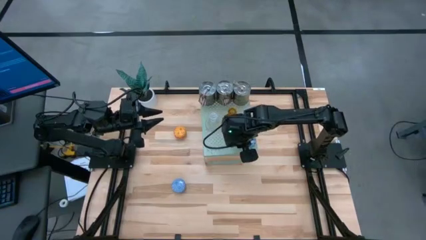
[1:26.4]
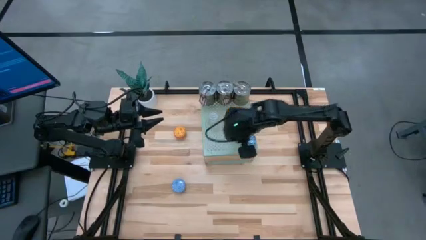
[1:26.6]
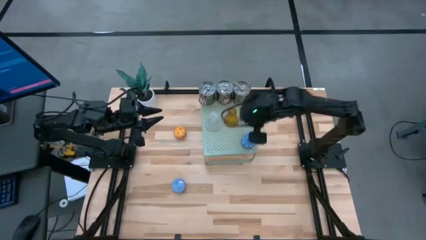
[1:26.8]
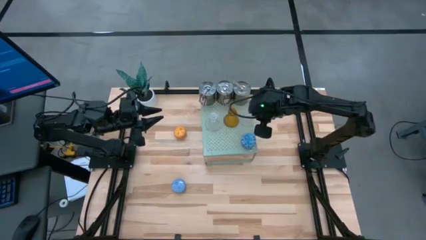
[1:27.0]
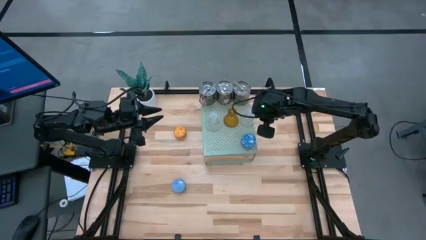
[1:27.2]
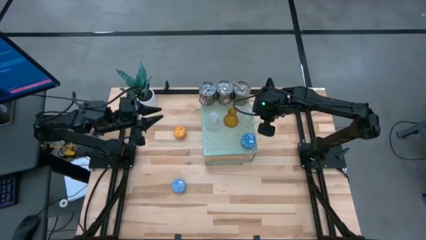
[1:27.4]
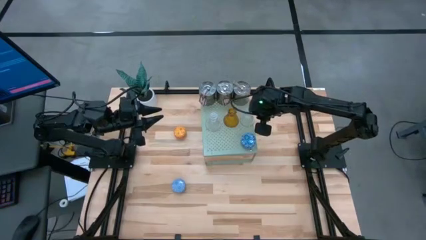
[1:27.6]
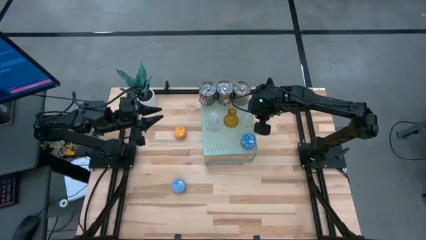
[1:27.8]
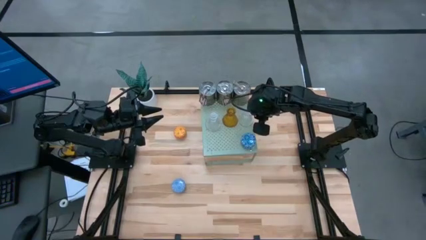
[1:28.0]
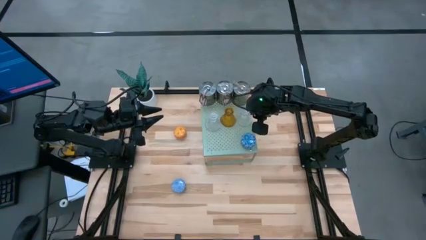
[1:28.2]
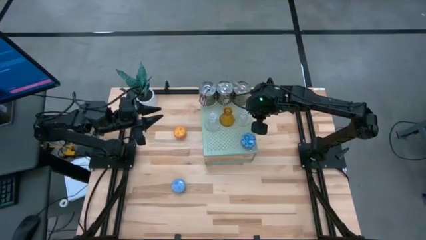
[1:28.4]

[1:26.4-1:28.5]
Task: Pick & Place candle stick holders
Adjust the right transparent candle holder on the shelf

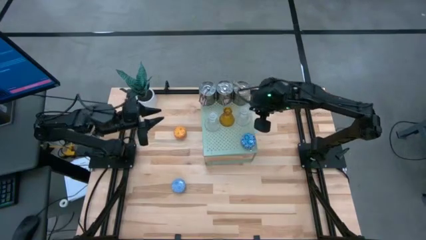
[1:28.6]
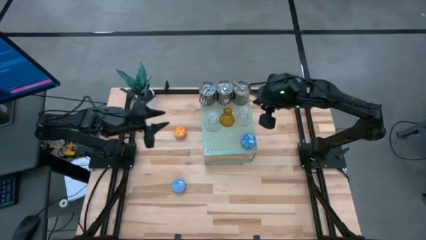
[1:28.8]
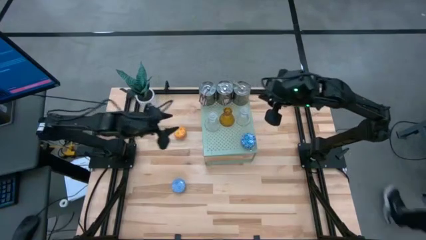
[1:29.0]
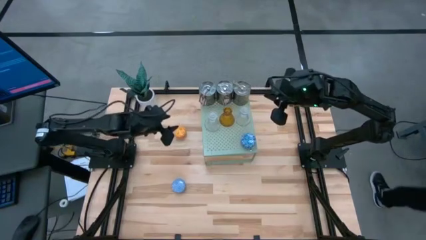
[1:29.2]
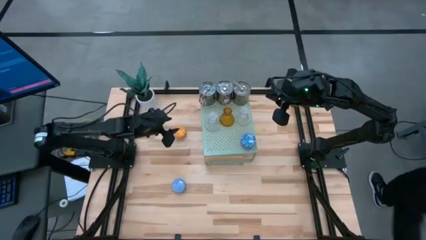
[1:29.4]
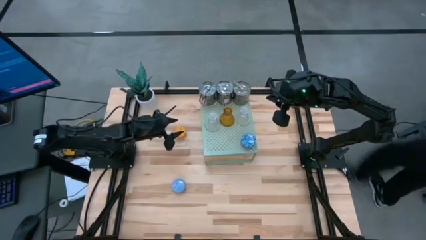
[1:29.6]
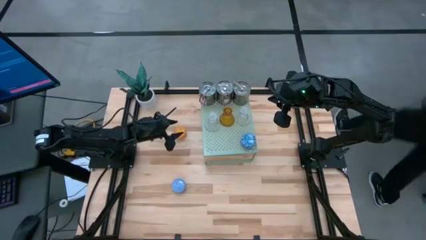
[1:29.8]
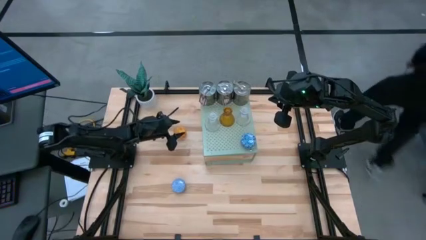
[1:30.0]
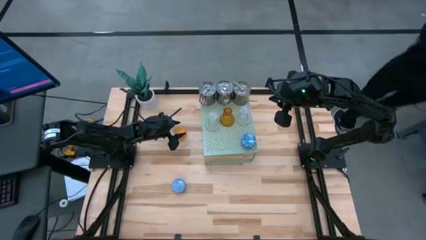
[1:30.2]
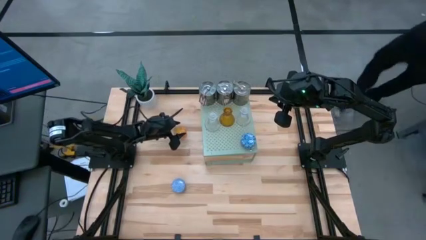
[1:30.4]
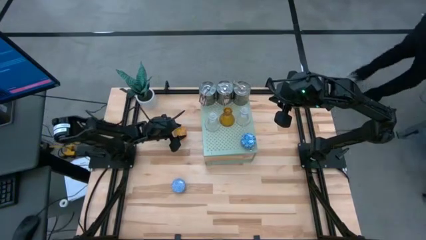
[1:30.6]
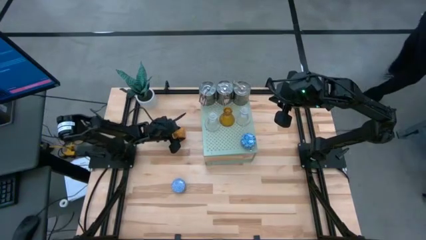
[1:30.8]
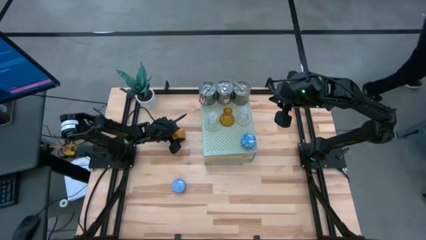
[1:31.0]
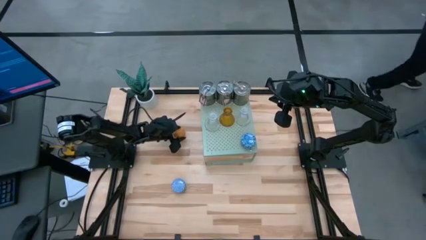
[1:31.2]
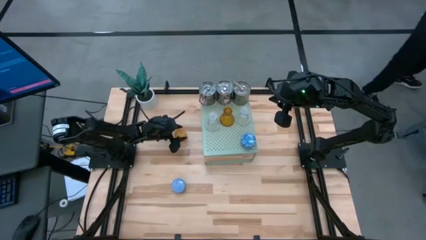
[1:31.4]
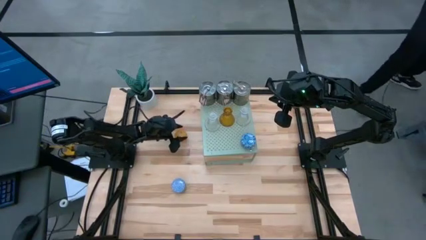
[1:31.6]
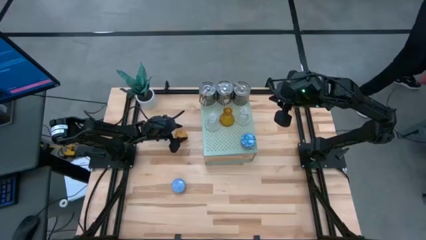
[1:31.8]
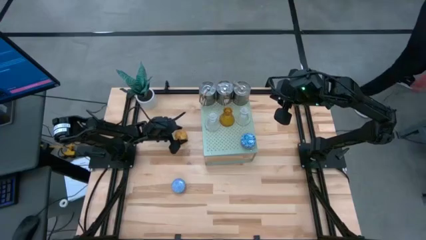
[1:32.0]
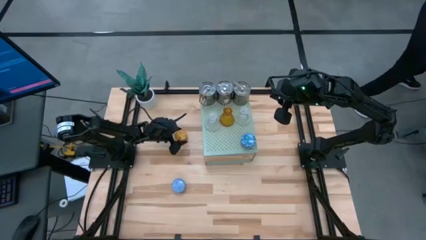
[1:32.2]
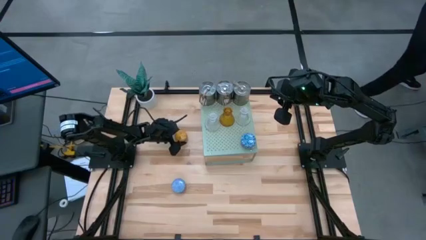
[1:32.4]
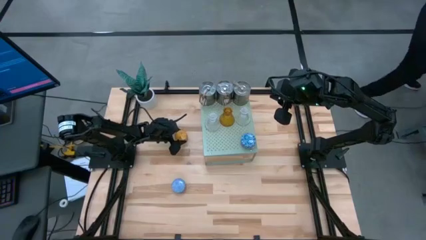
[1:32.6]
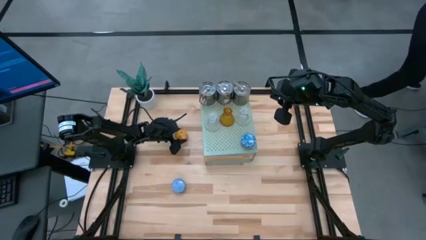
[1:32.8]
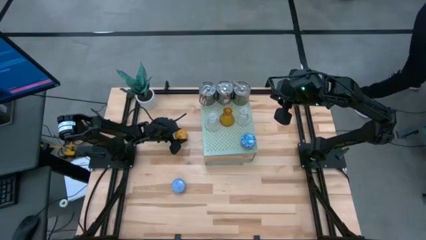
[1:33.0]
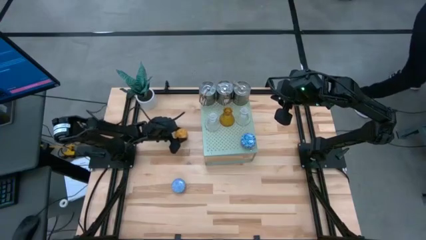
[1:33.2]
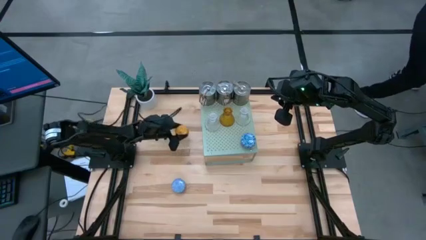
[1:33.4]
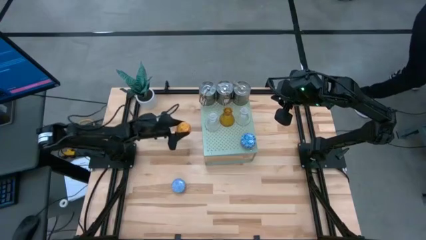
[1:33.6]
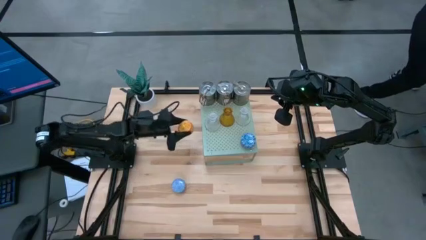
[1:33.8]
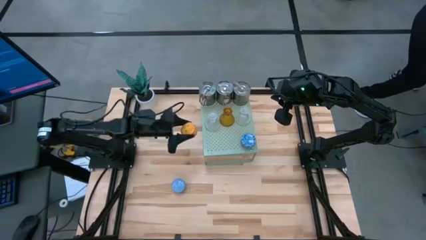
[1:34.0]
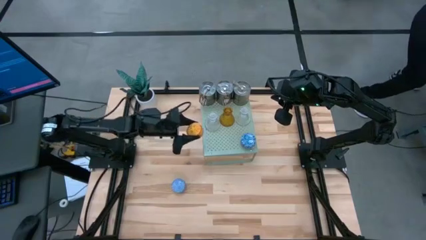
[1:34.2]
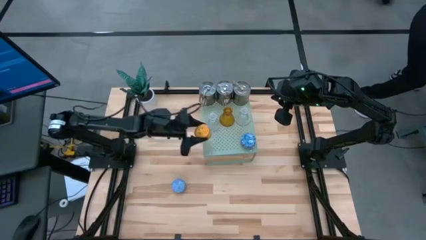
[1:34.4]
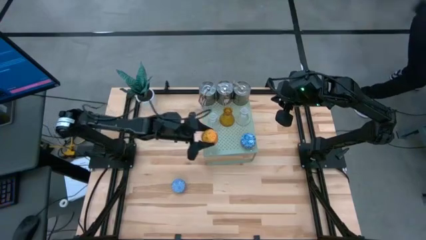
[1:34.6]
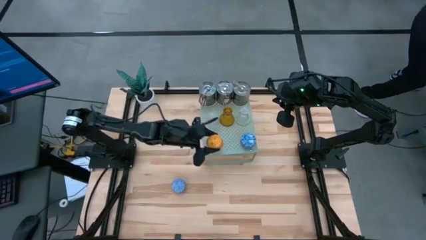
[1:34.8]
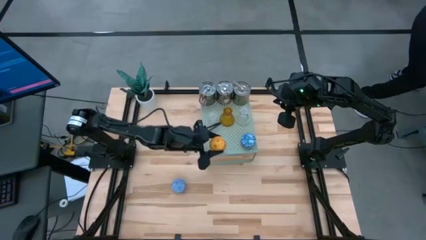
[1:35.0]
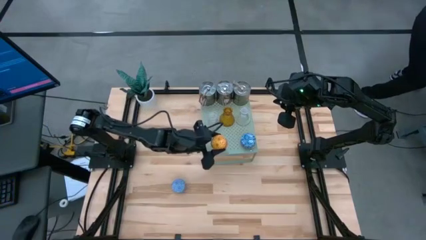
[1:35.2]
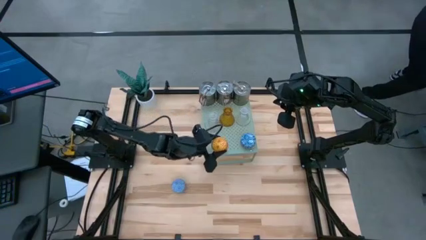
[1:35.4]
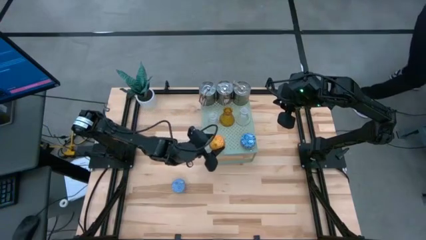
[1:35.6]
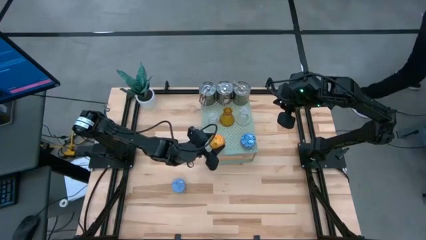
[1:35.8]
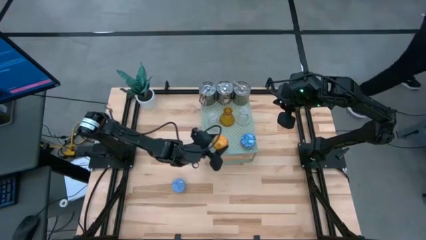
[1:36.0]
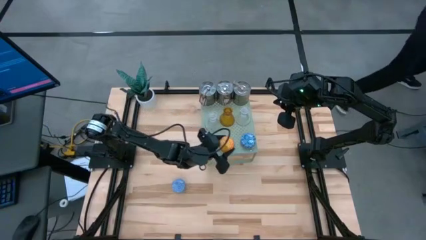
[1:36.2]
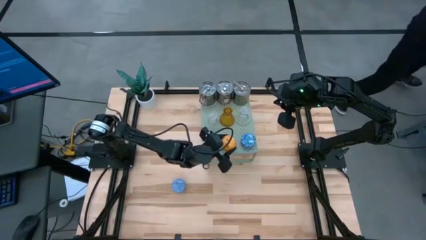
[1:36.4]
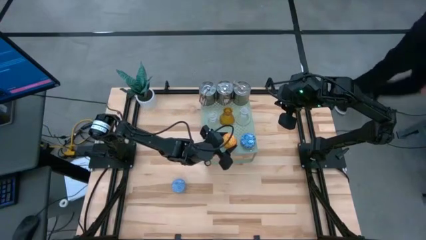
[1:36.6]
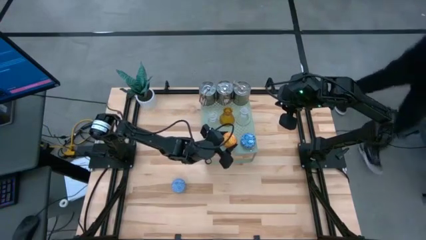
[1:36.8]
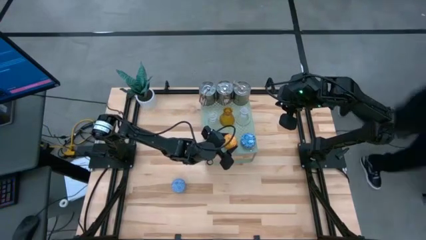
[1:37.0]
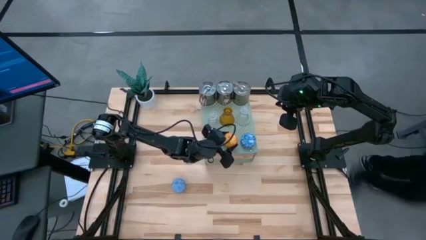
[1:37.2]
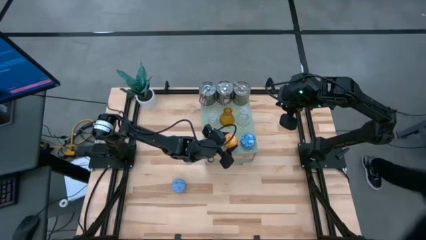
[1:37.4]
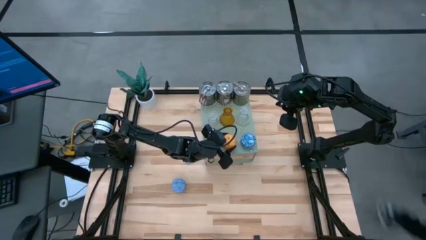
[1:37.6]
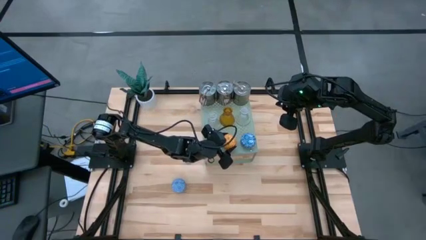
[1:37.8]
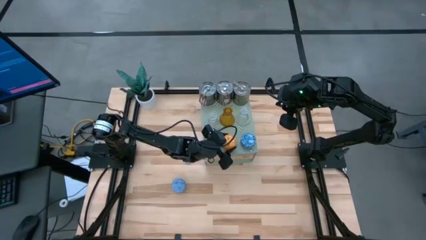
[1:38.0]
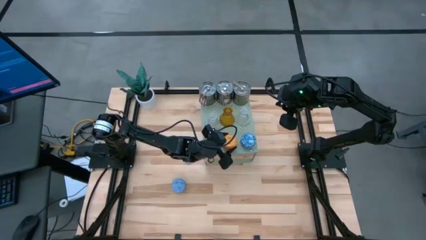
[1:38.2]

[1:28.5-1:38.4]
Put the orange scented candle on the shelf

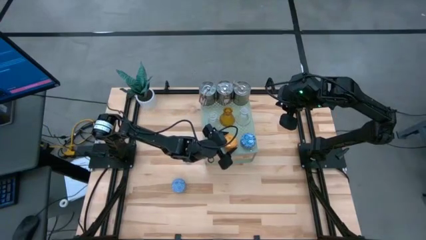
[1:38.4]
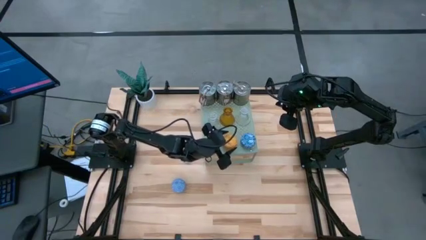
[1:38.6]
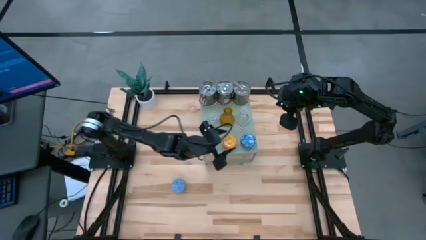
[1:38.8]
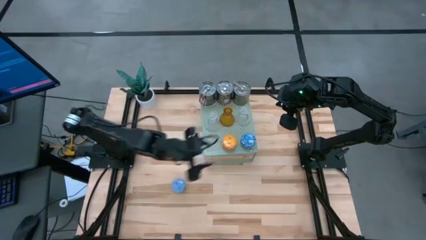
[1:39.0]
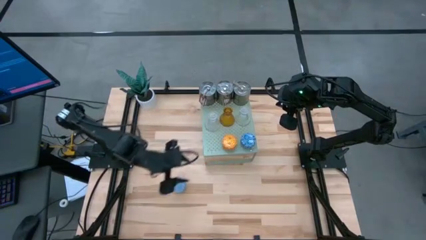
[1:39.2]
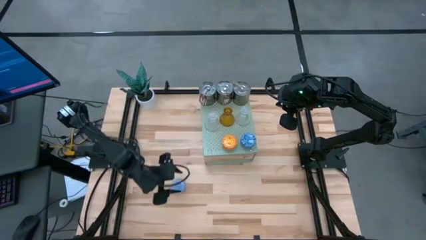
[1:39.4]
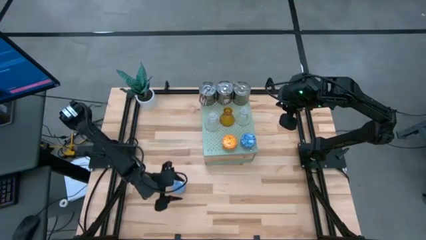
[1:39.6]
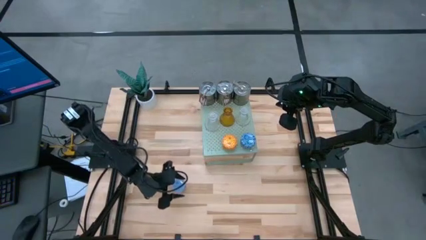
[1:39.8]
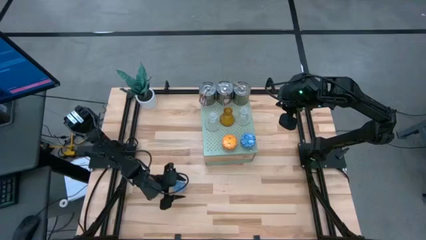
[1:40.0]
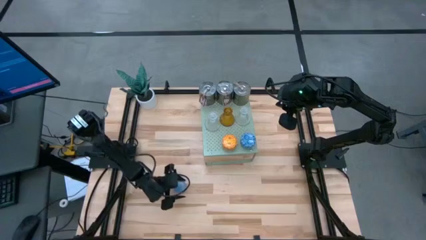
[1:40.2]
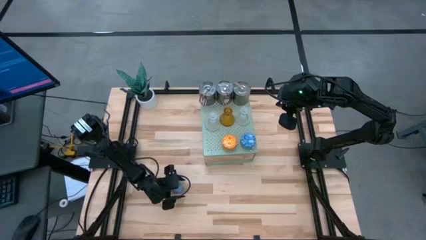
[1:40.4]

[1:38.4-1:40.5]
Put the blue scented candle on the shelf
